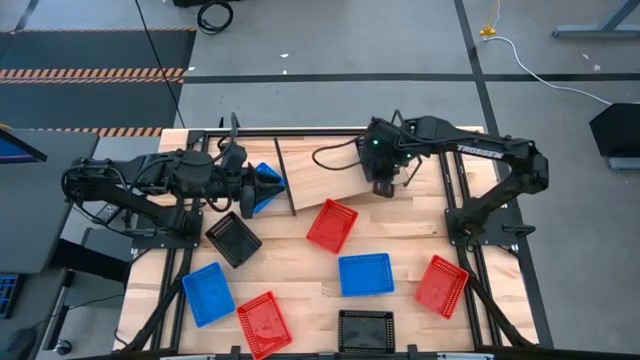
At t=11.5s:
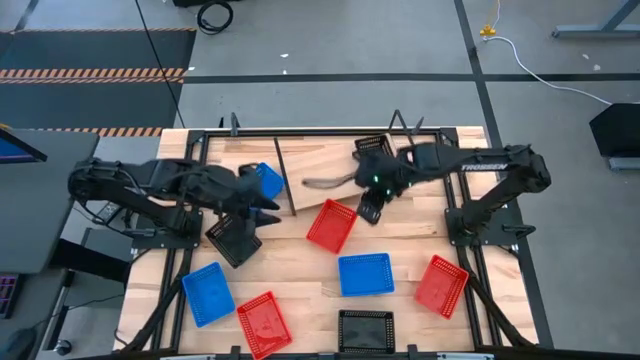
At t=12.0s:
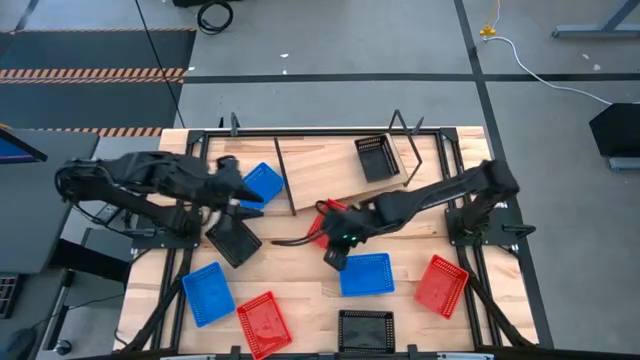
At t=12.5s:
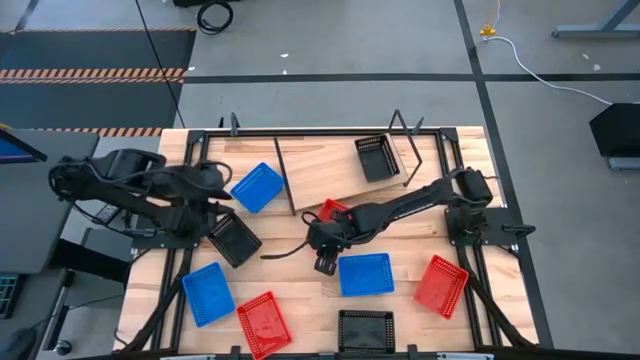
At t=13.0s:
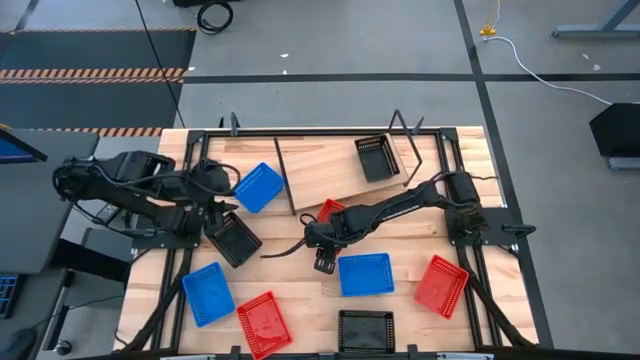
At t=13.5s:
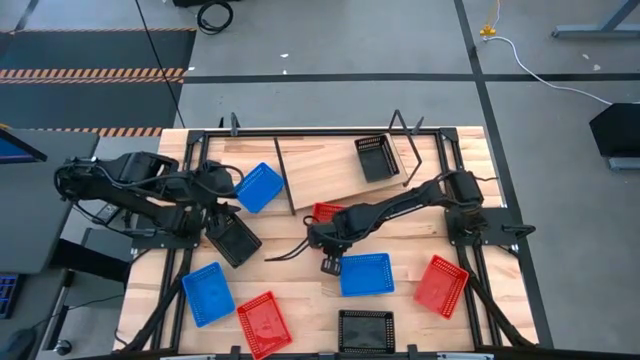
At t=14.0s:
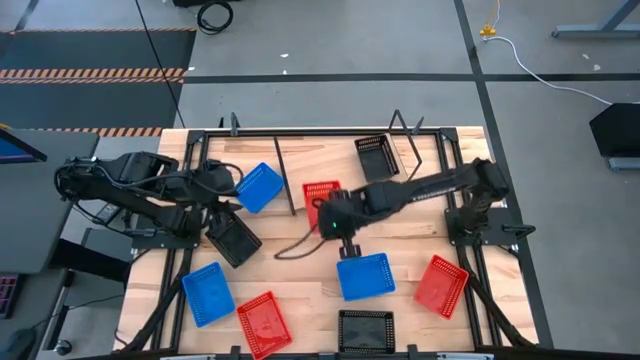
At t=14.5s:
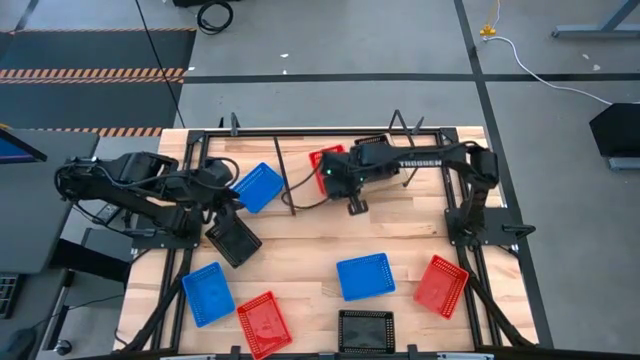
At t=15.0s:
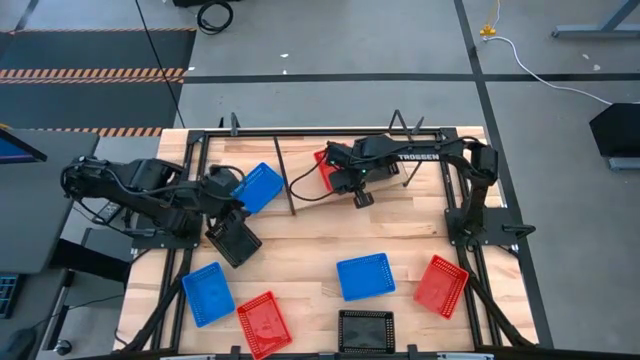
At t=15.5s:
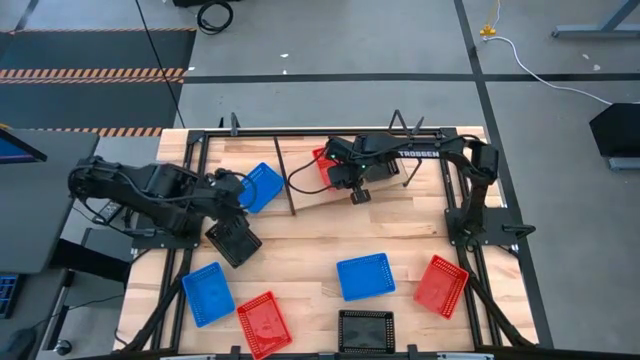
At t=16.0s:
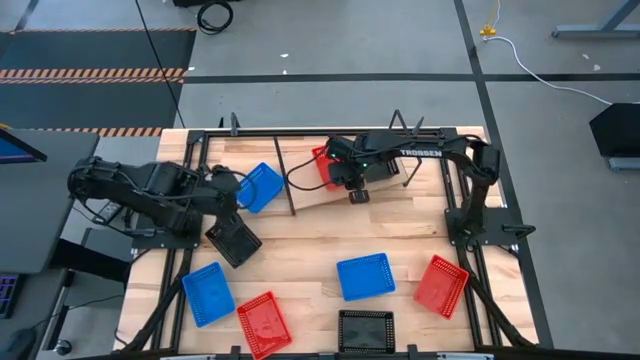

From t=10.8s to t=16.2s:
Task: Stack baskets on shelf by color
Put the top red bin on the shelf

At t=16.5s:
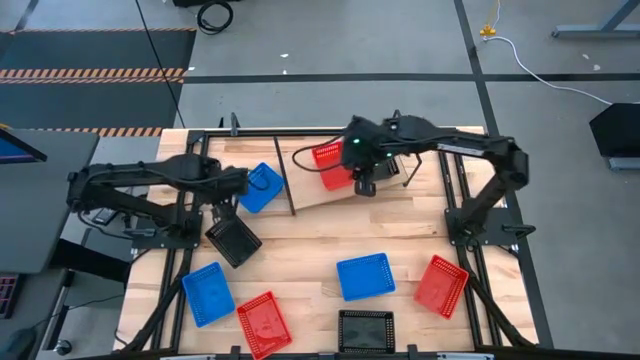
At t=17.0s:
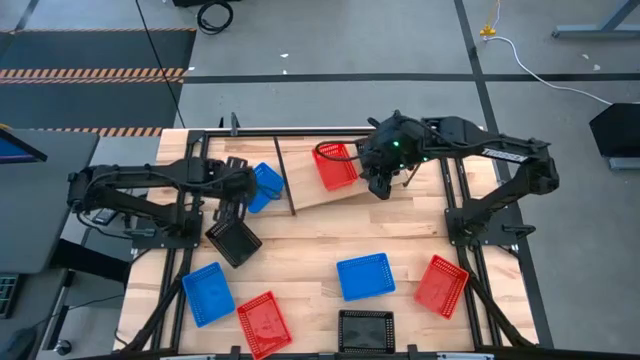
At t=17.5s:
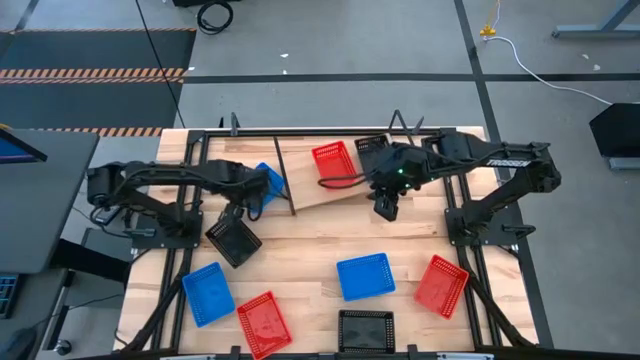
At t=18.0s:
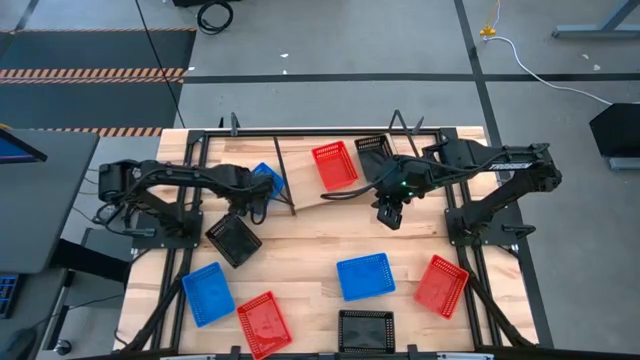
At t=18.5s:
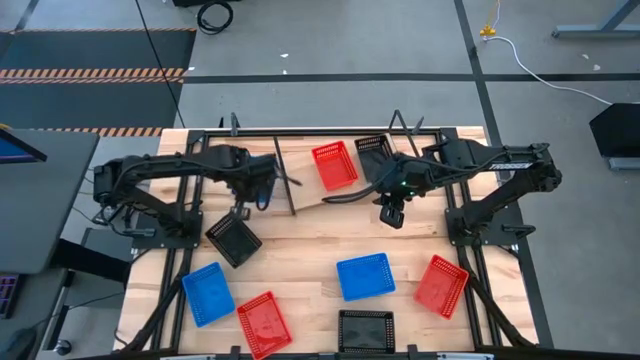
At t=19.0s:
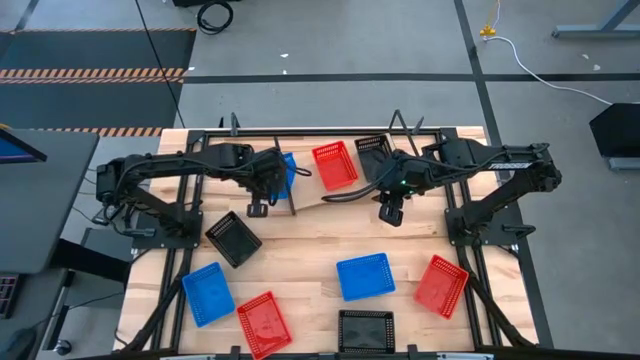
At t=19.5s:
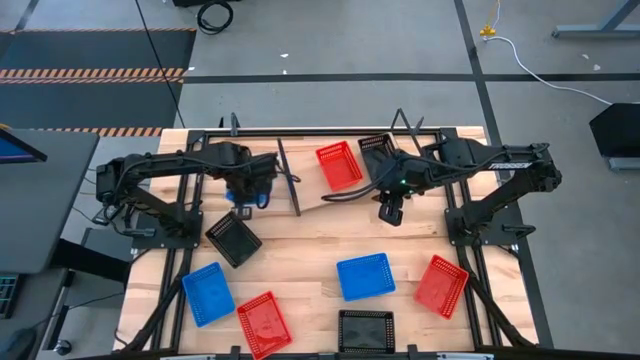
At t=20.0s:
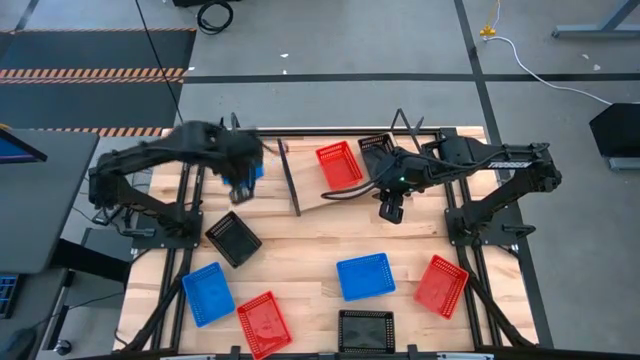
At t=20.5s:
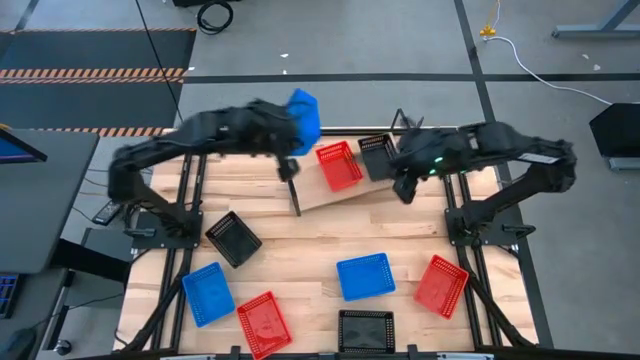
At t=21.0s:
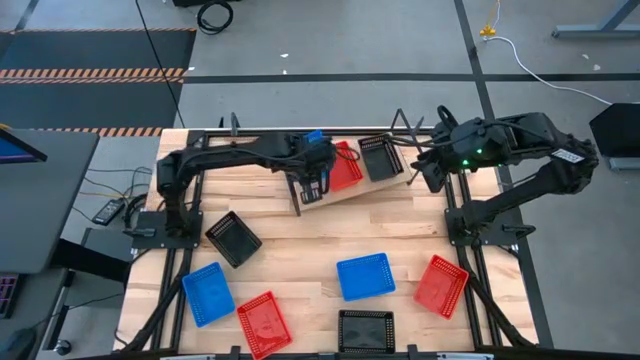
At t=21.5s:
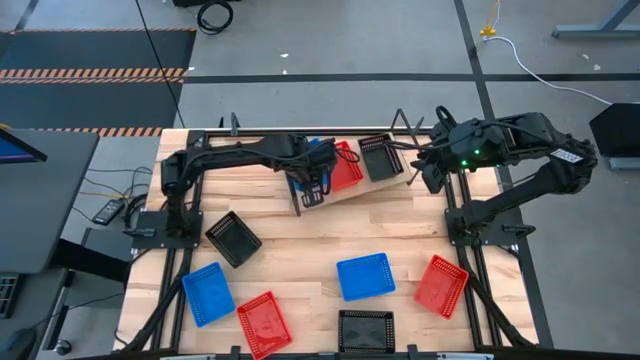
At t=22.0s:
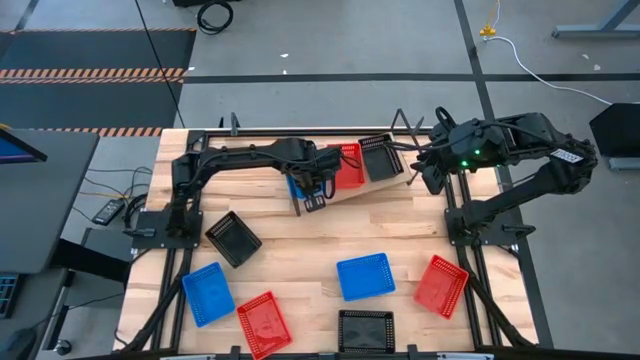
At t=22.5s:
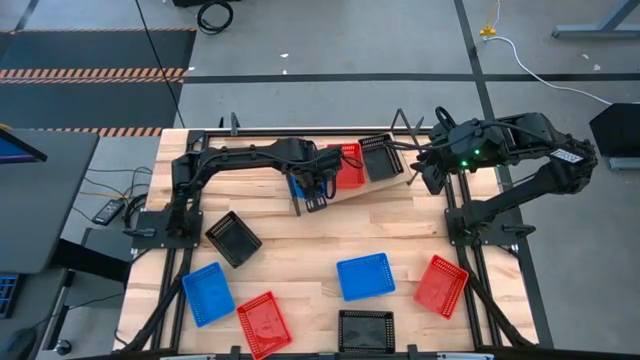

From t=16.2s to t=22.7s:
Put the top blue bin on the shelf

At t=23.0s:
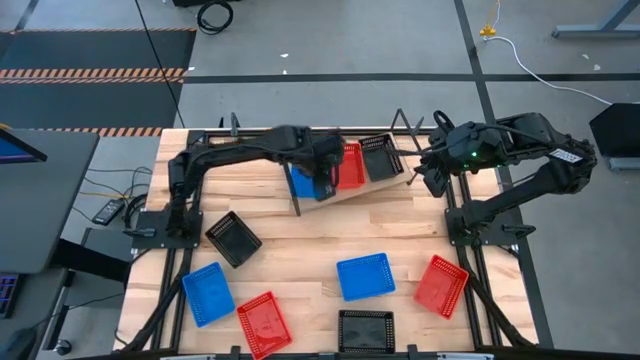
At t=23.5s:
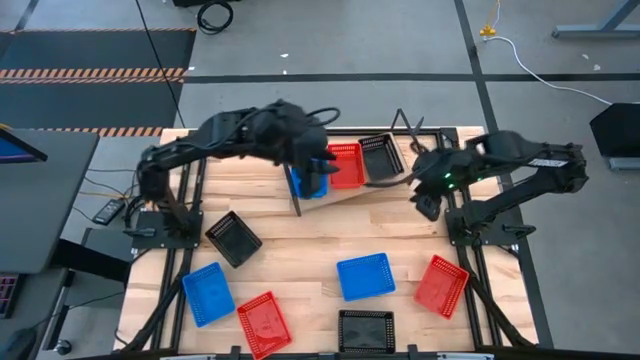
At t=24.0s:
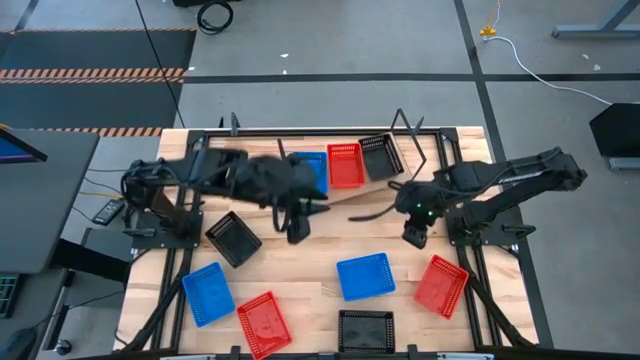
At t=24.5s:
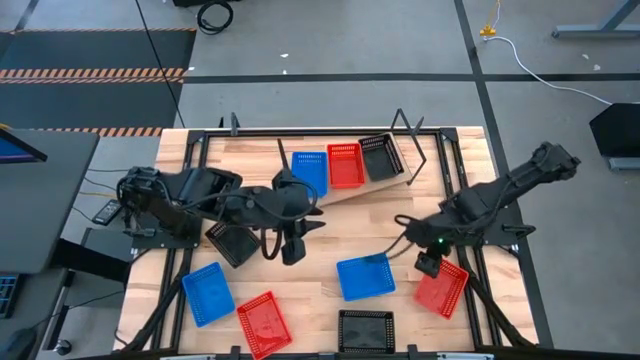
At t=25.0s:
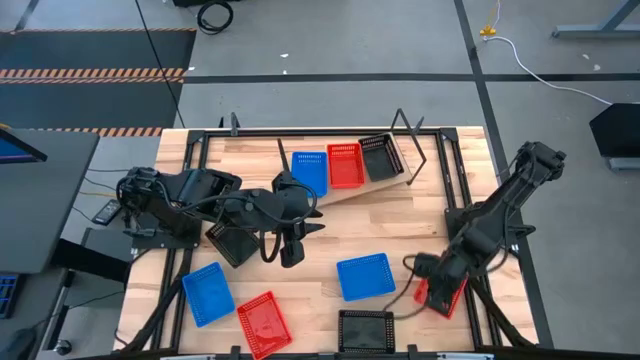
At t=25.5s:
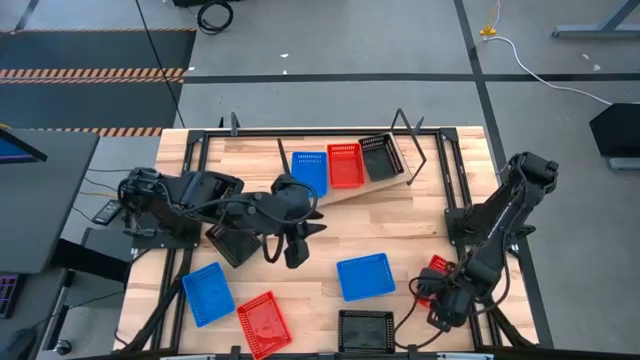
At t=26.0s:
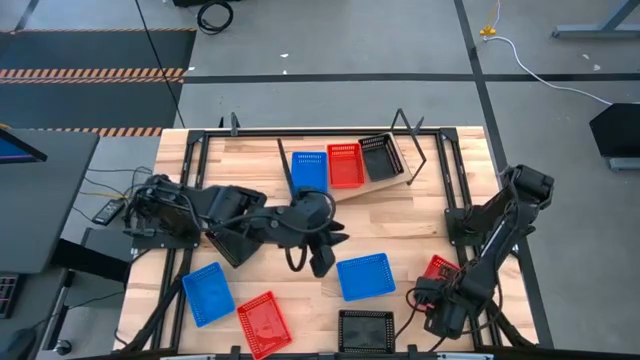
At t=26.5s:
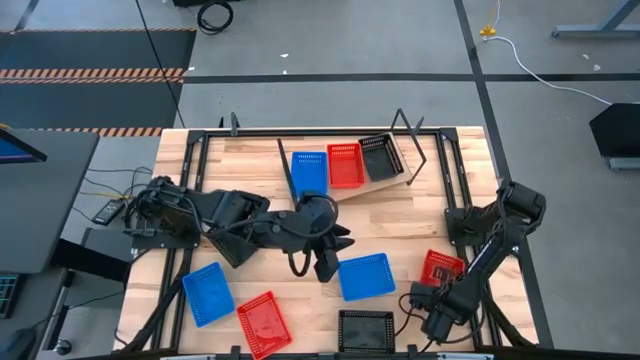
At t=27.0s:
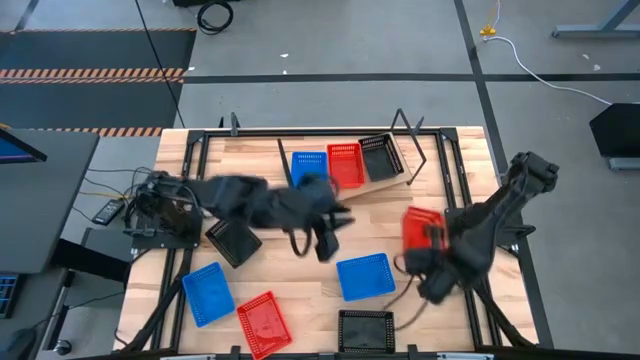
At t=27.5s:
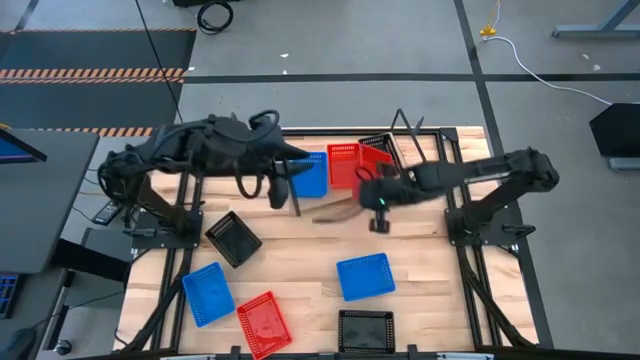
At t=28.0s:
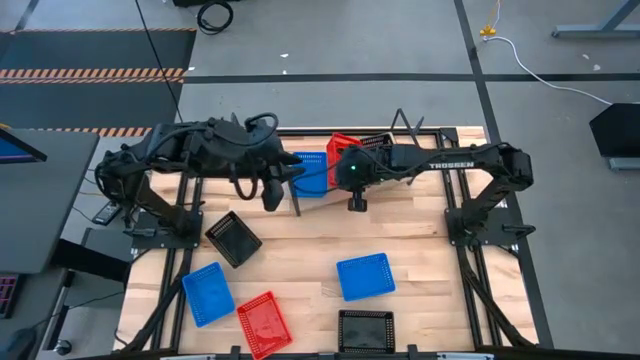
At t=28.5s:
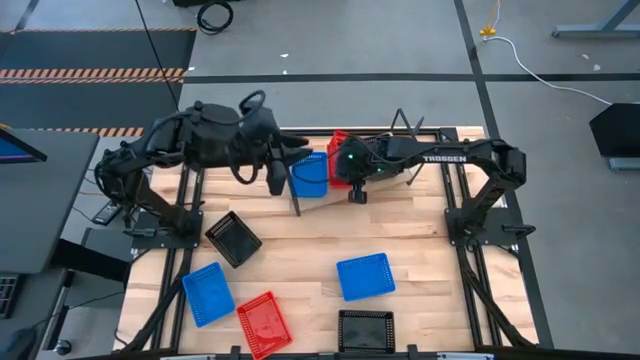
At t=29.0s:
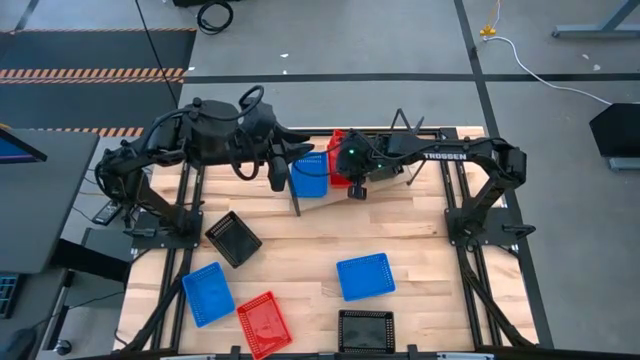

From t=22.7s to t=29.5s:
Stack the right red bin on the red bin on the shelf
